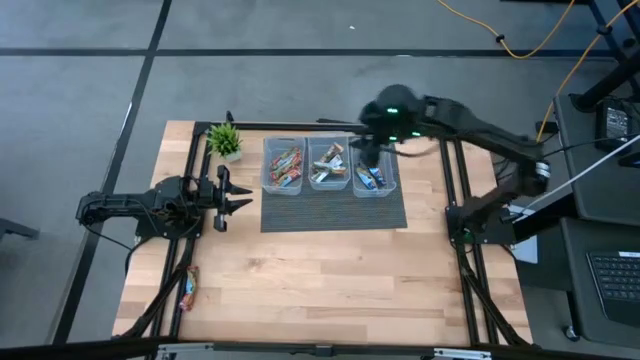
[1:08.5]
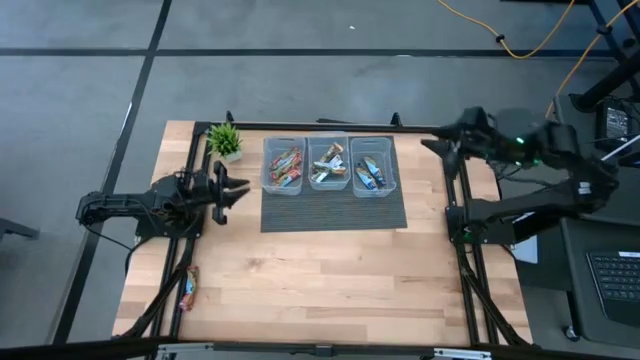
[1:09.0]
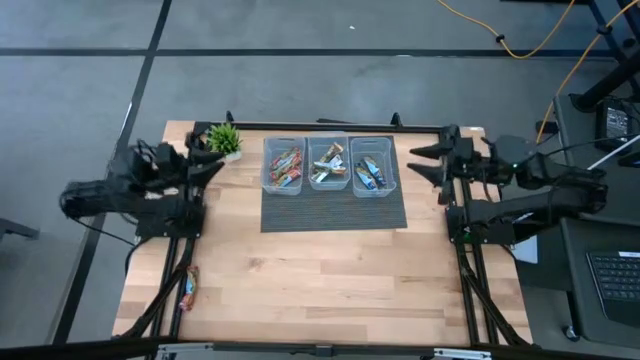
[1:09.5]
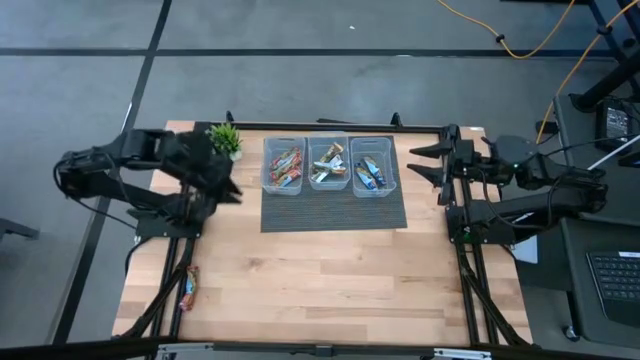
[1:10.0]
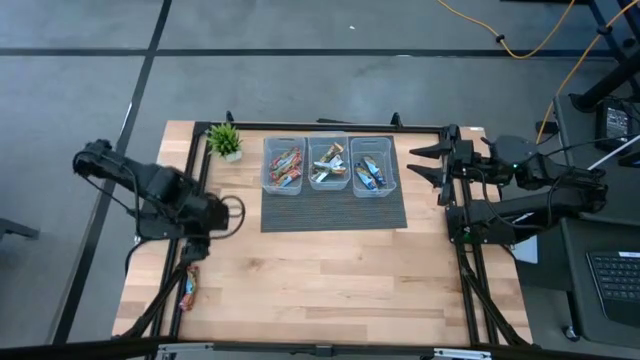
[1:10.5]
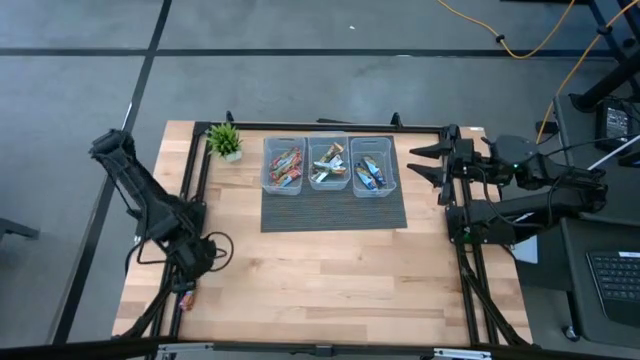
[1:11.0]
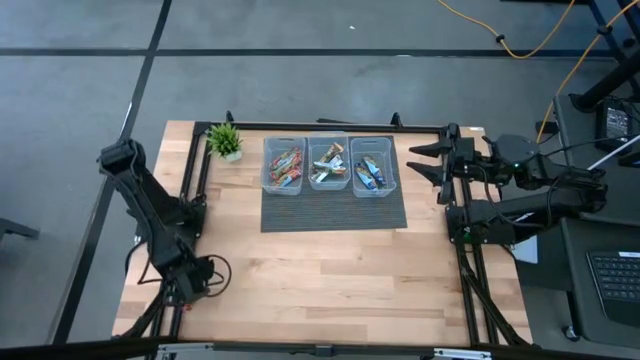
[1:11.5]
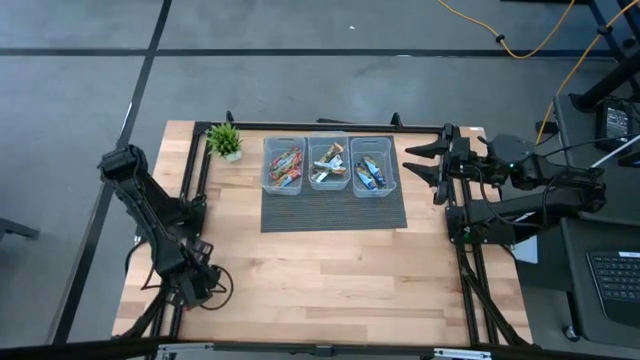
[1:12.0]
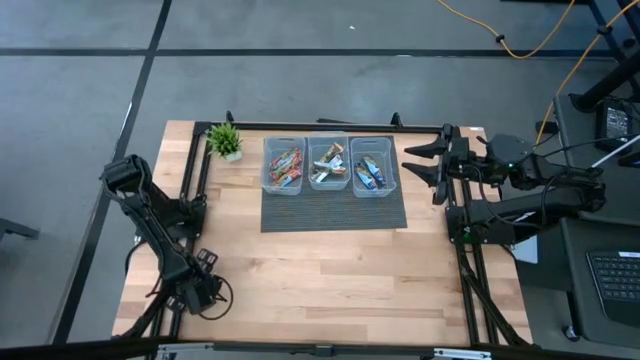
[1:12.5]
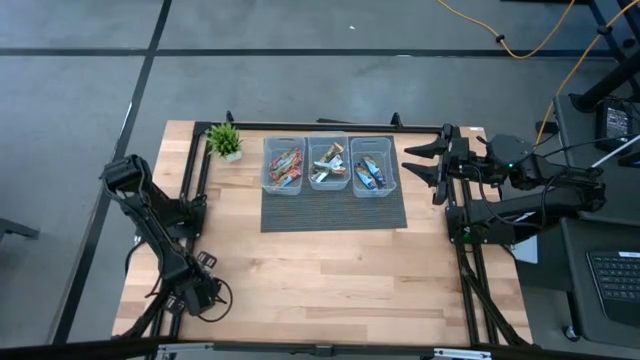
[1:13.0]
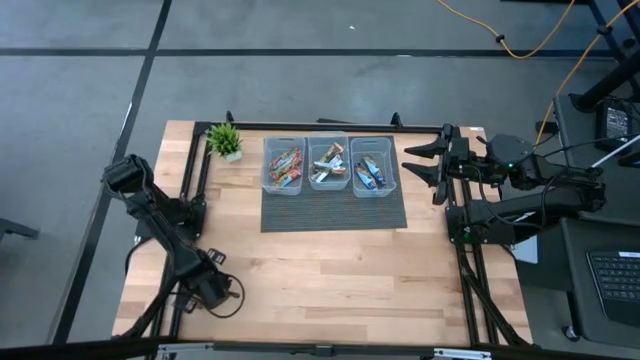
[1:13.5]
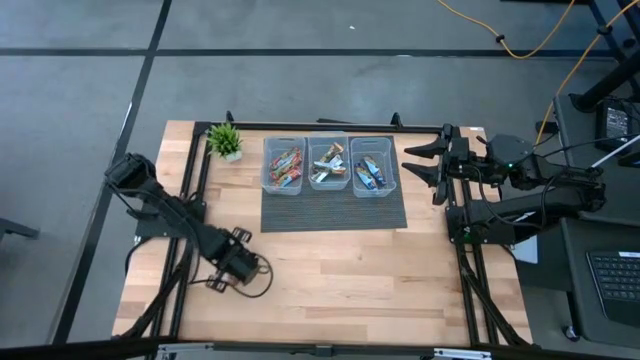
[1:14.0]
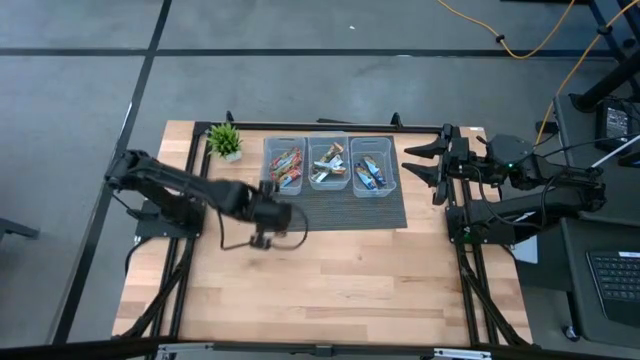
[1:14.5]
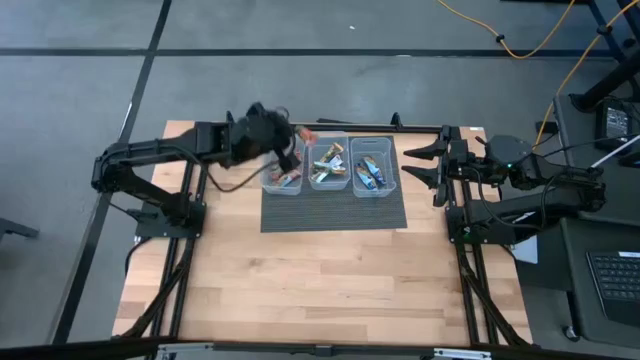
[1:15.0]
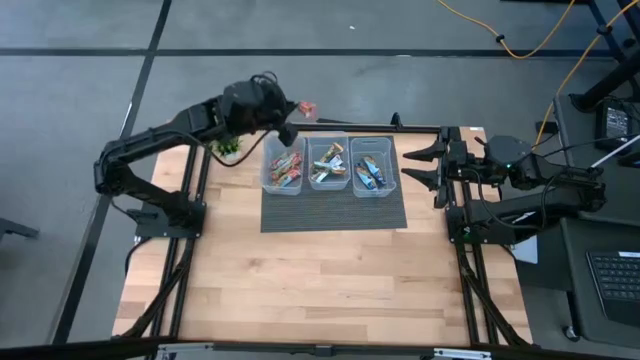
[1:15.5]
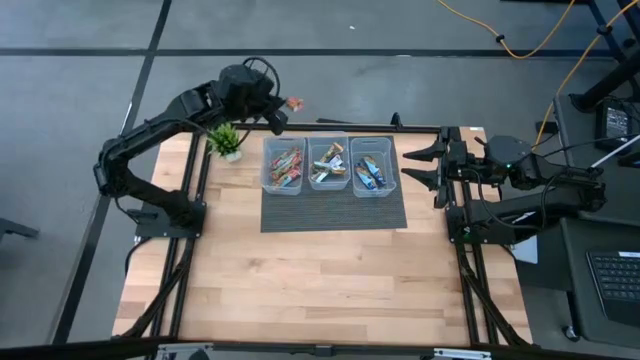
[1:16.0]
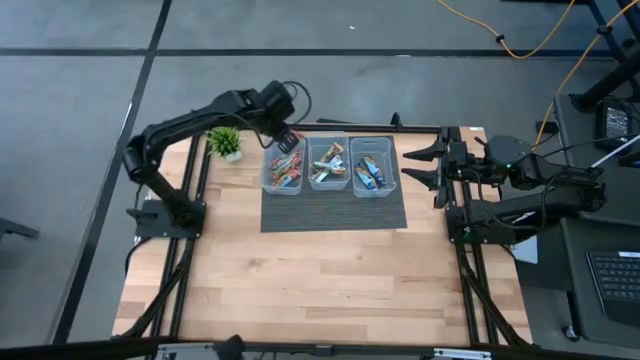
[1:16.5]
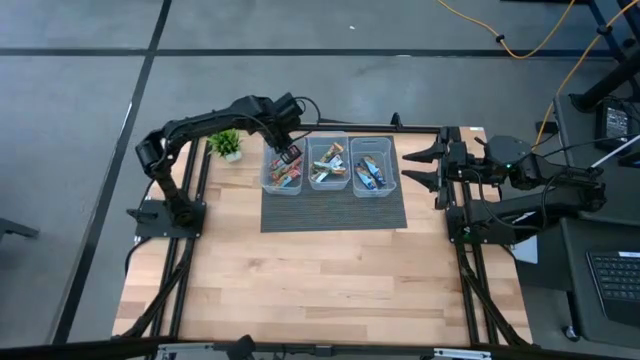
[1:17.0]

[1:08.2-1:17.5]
Task: Pick and place Granola Bars by type
Put the red snack bar into the left transparent bin

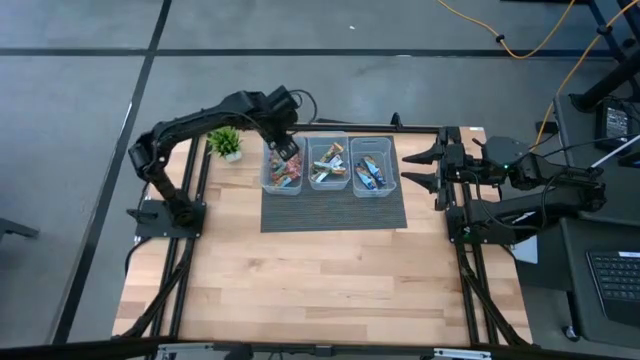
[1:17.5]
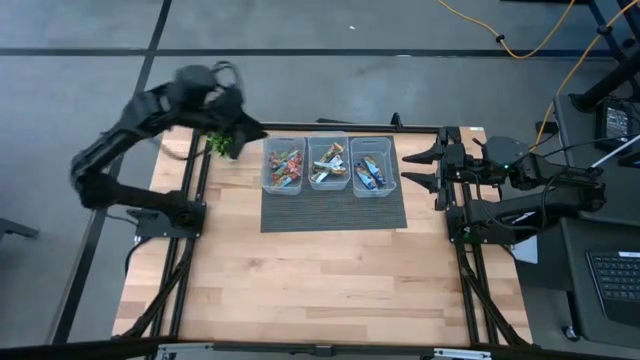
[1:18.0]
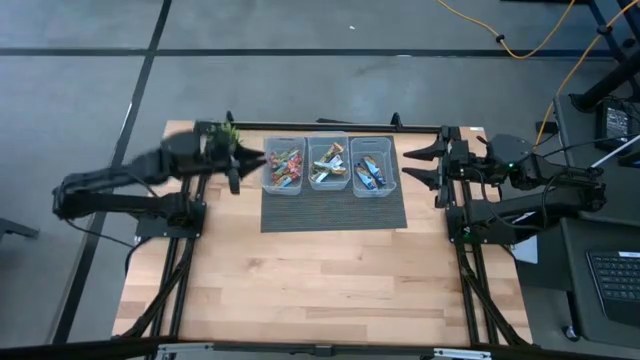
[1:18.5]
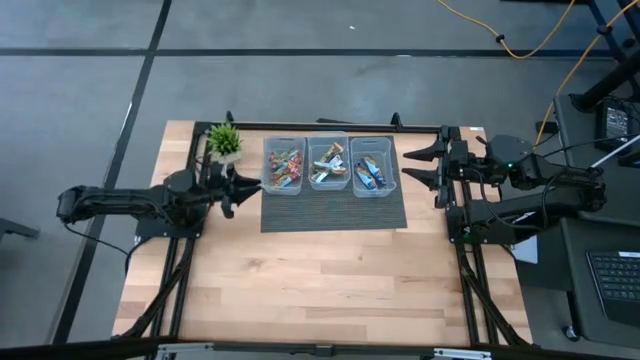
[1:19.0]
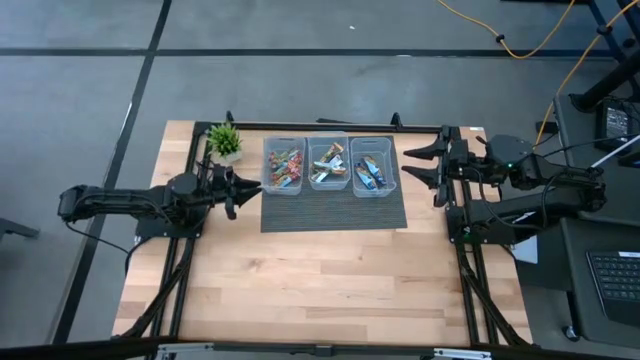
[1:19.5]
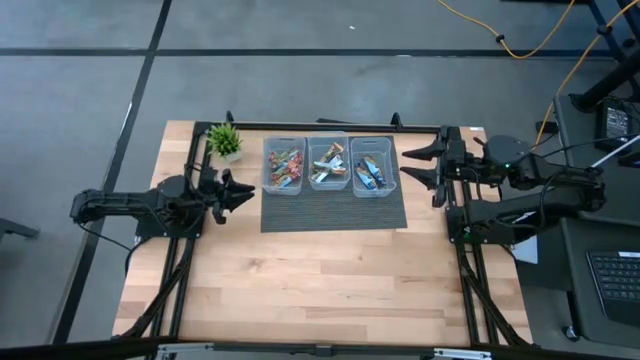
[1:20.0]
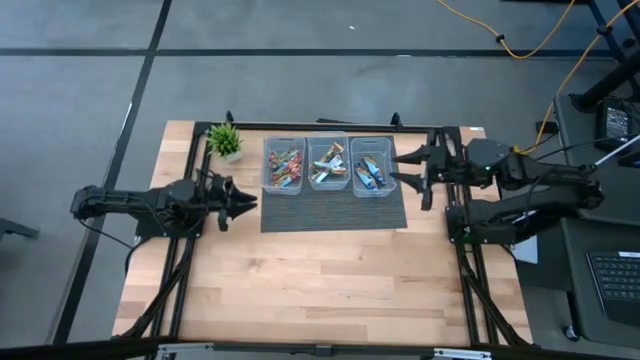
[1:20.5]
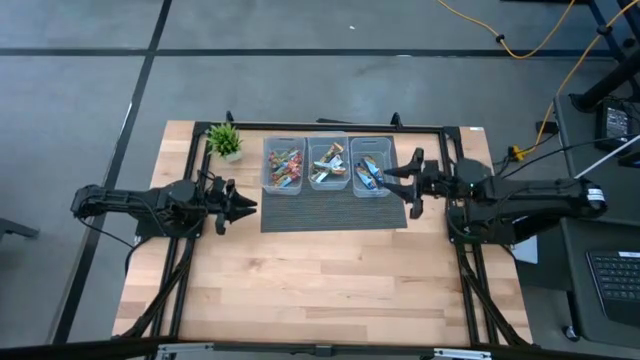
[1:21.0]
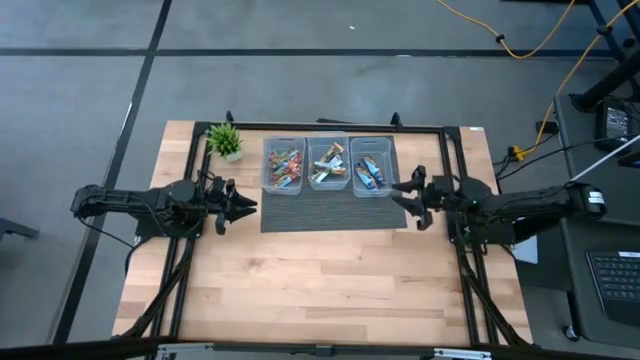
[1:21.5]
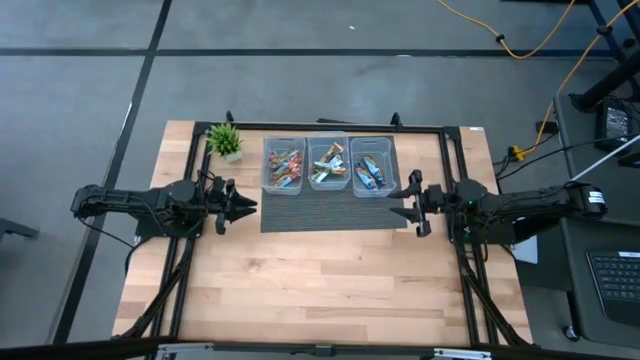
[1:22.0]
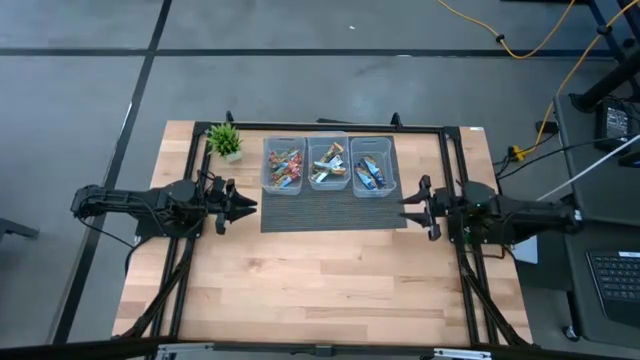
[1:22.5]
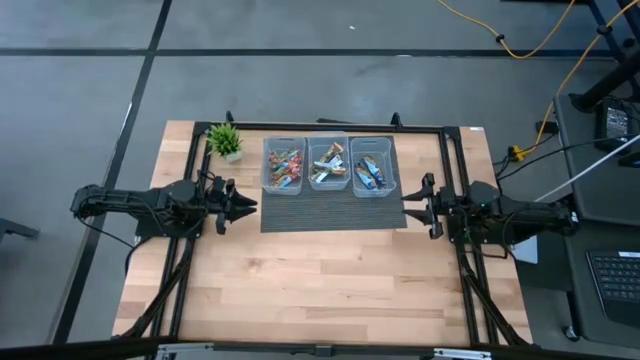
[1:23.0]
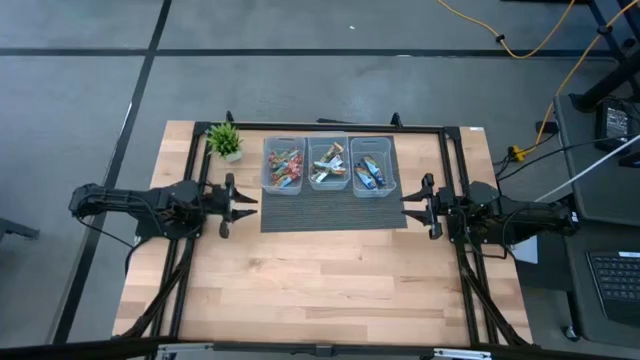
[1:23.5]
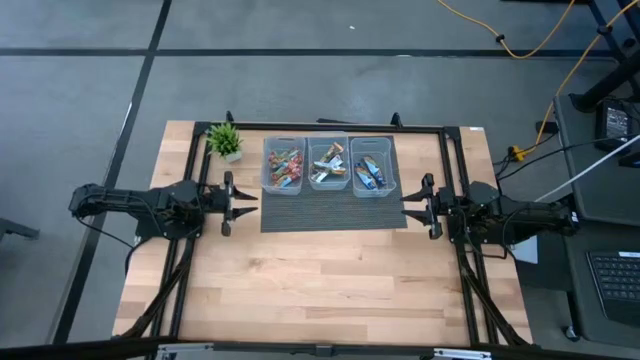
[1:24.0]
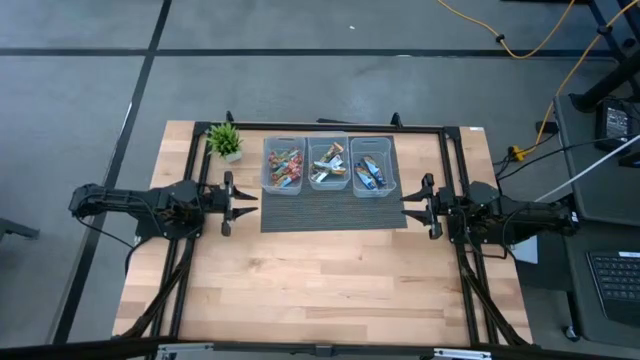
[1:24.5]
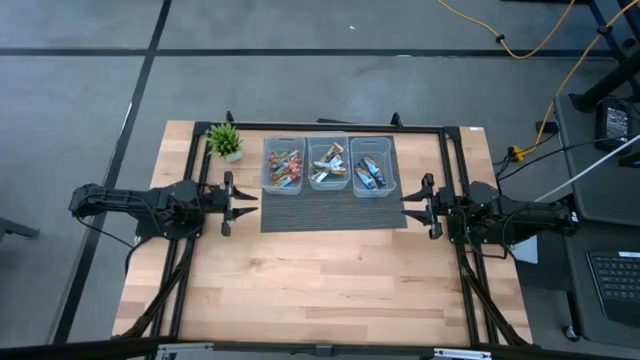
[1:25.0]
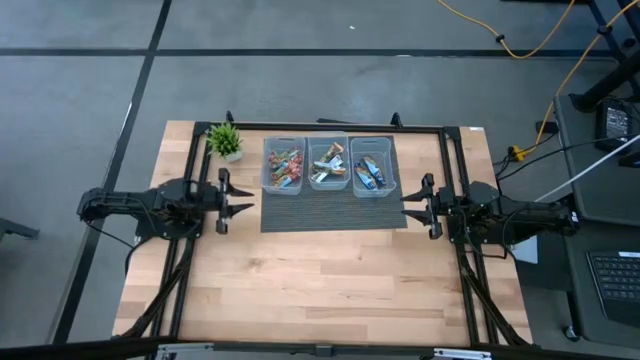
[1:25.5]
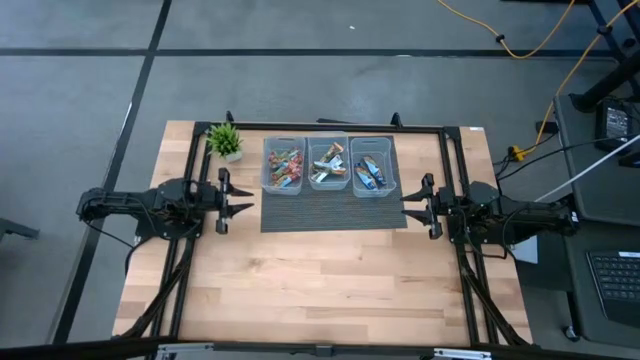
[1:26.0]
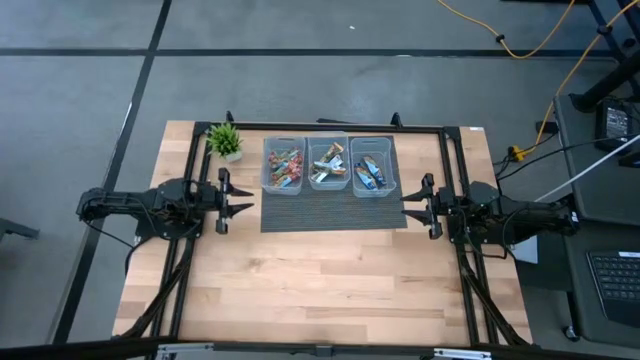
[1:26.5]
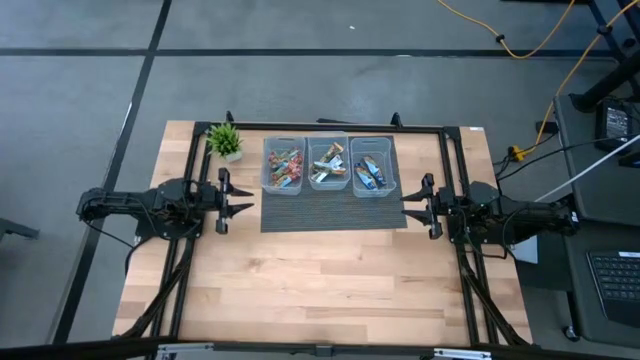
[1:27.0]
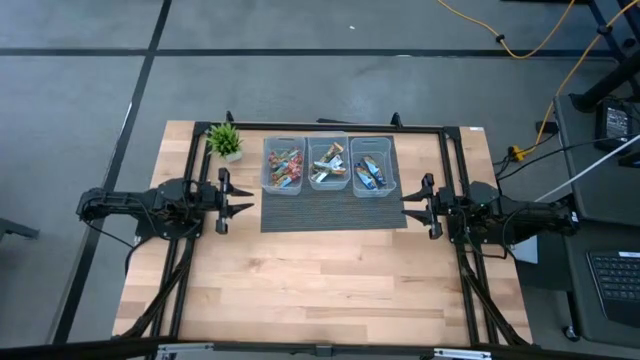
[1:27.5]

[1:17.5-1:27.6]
Return to Home Position

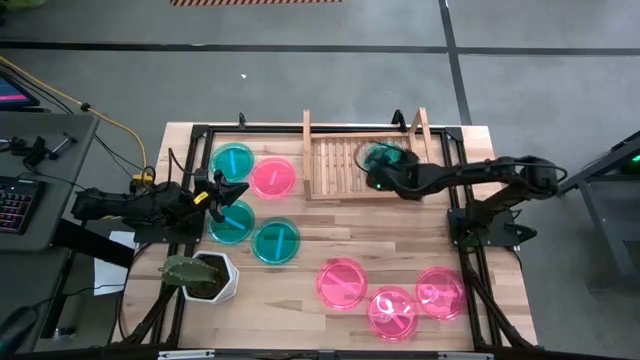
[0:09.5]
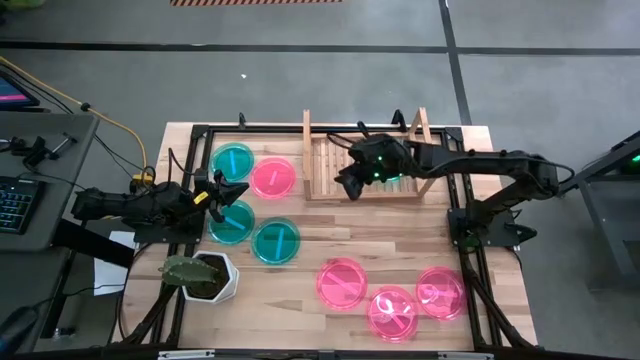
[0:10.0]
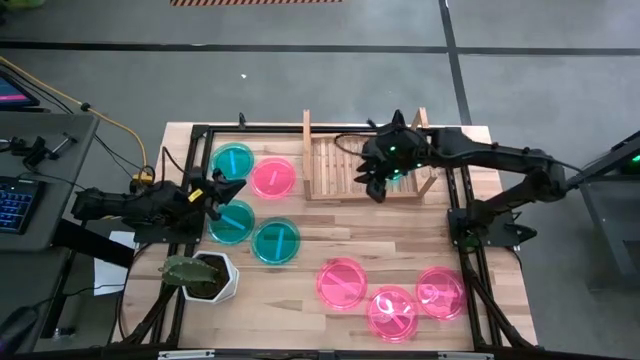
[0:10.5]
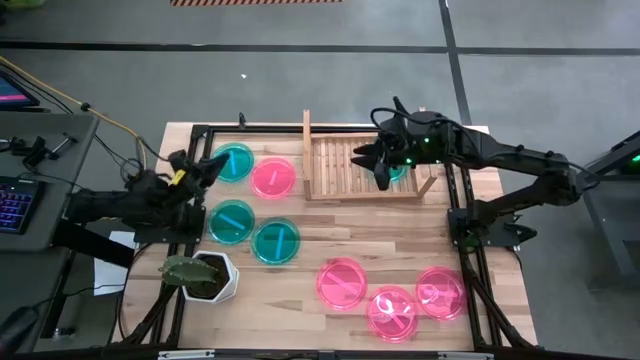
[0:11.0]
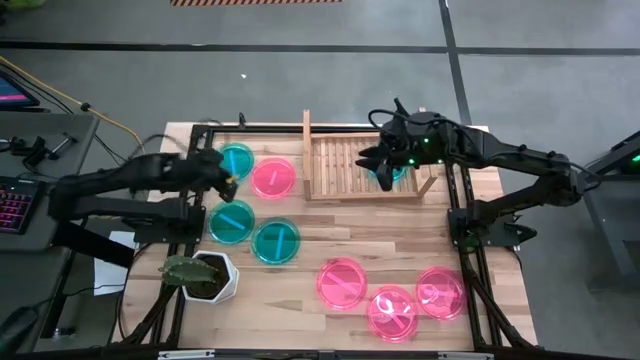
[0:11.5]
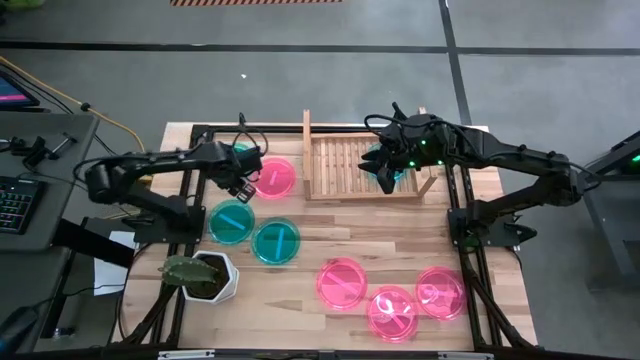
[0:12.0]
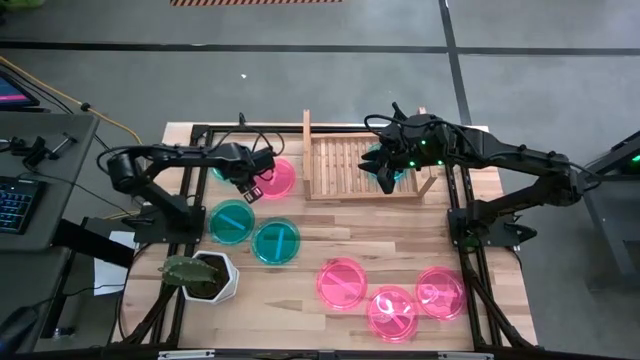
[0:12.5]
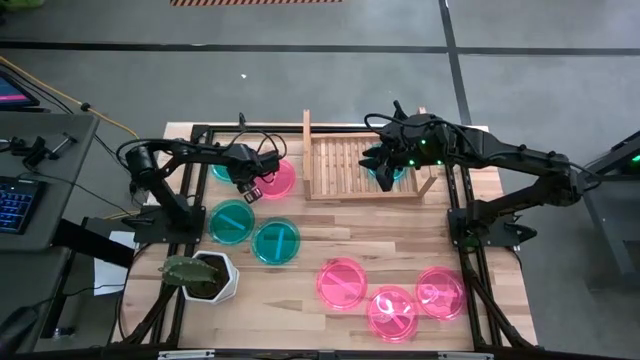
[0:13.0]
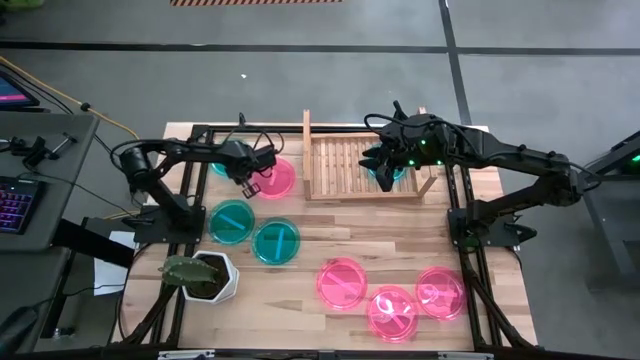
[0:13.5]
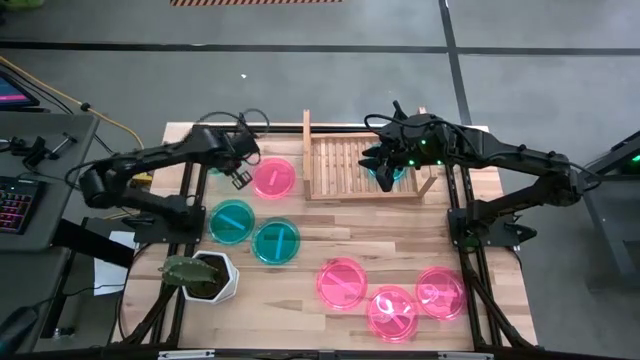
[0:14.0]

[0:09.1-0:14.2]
Task: Place and stack plates onto a shelf
Stack the blue plate on top of the other blue plate on the shelf
